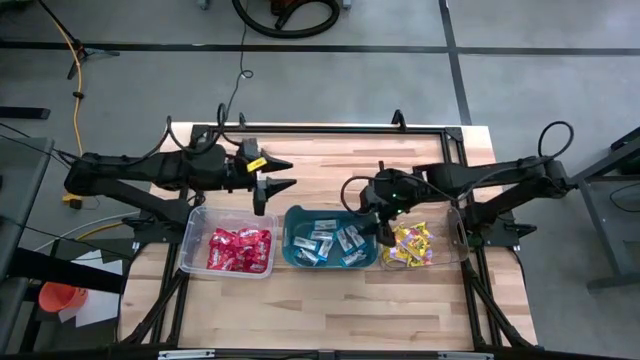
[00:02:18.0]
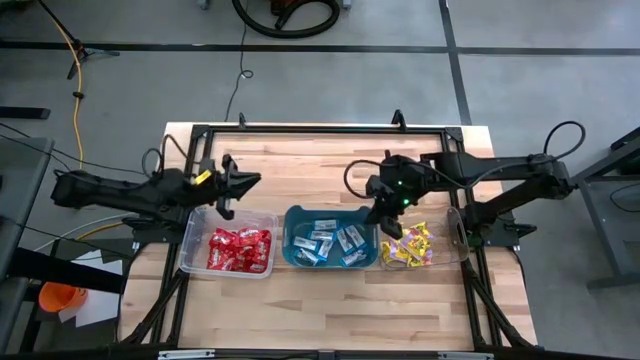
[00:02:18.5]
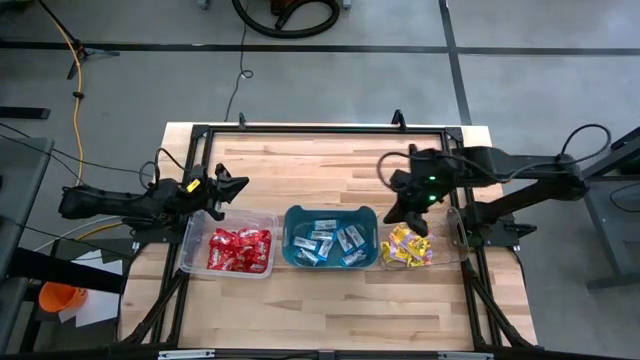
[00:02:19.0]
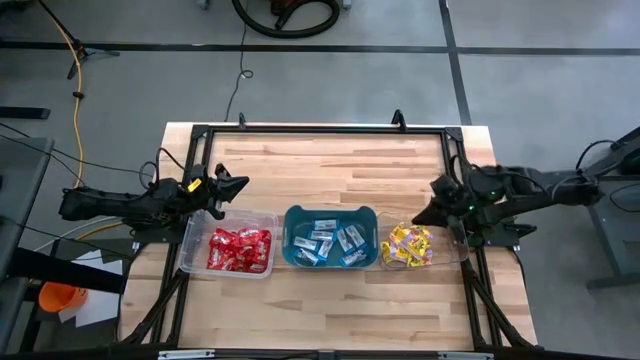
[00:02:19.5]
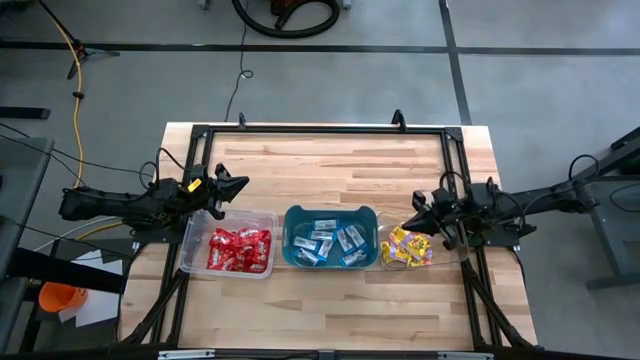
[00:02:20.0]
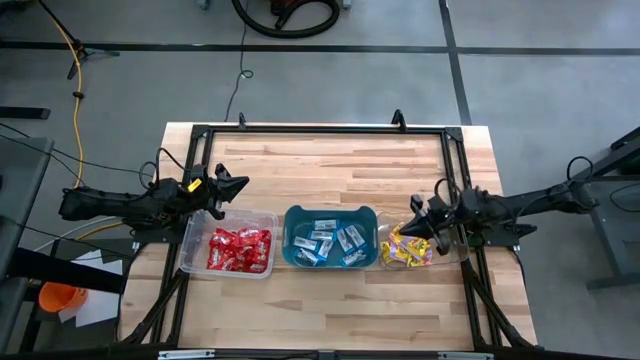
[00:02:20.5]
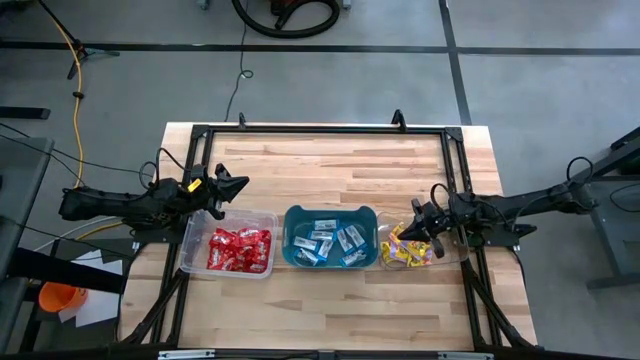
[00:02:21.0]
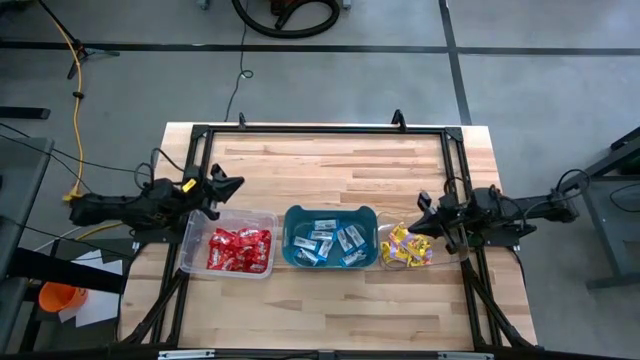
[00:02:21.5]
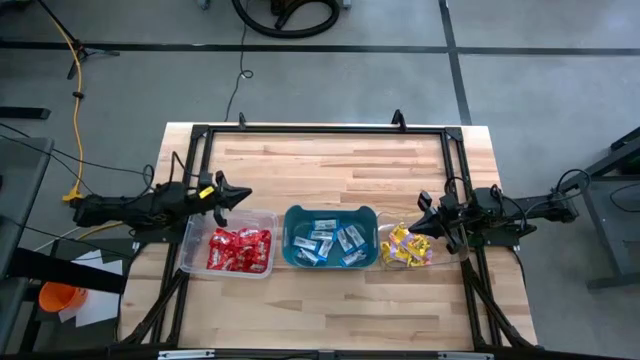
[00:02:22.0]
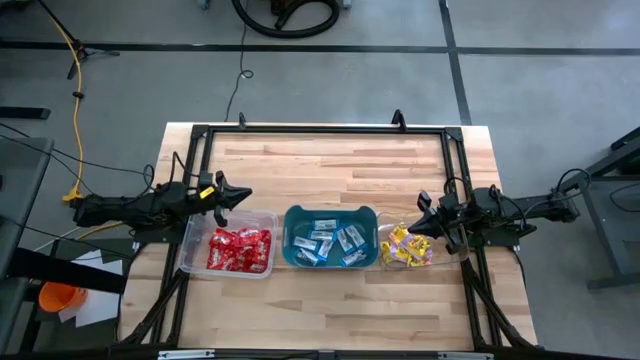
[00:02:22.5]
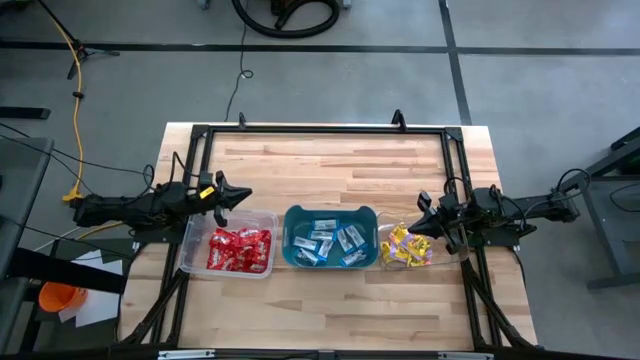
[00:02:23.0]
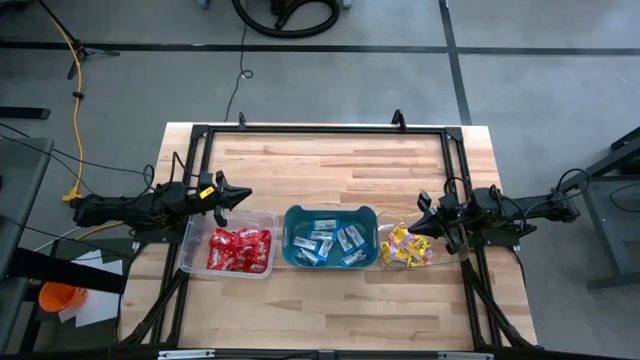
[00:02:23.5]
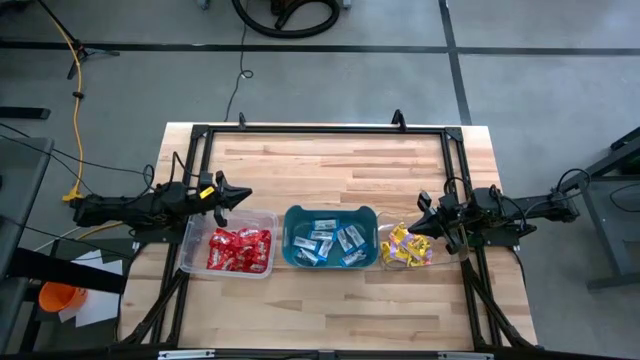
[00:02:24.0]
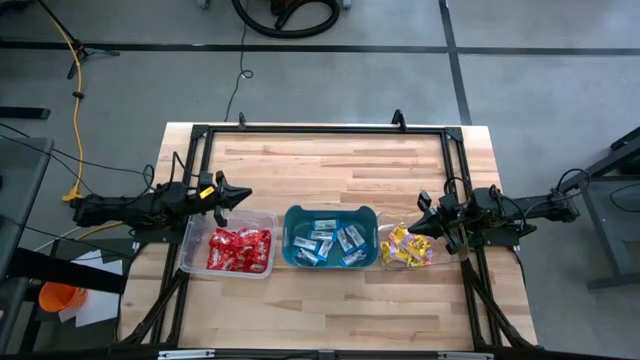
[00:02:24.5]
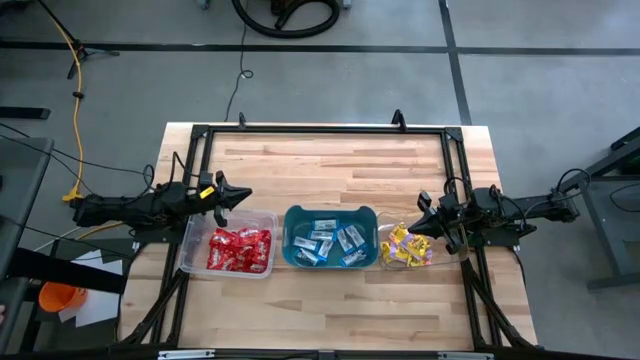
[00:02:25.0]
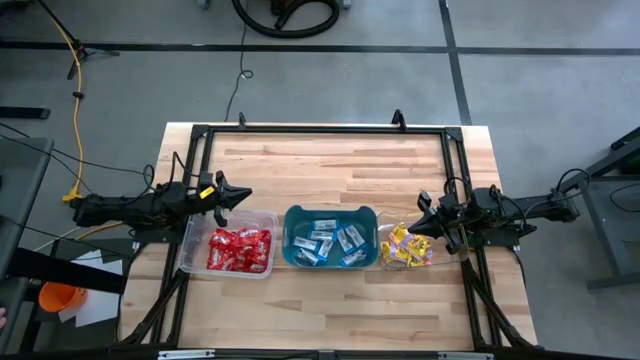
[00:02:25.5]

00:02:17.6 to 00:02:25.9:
Task: Sort candy
Return to Home Position

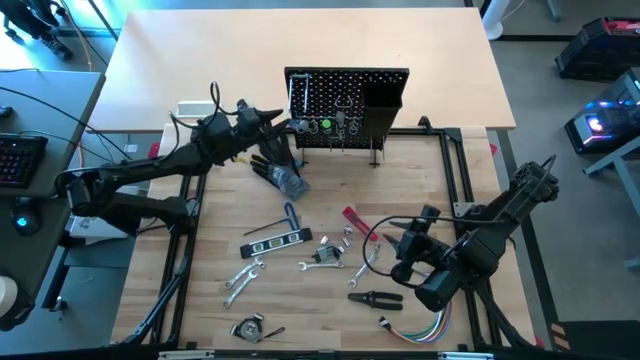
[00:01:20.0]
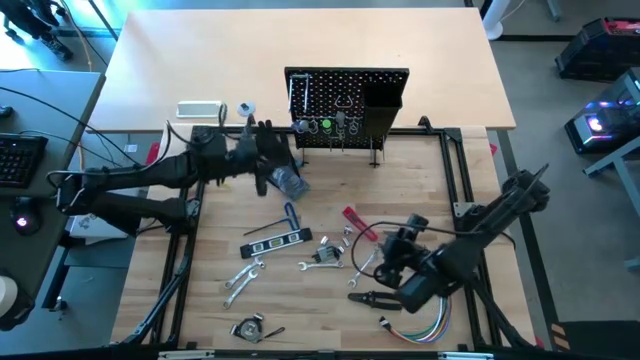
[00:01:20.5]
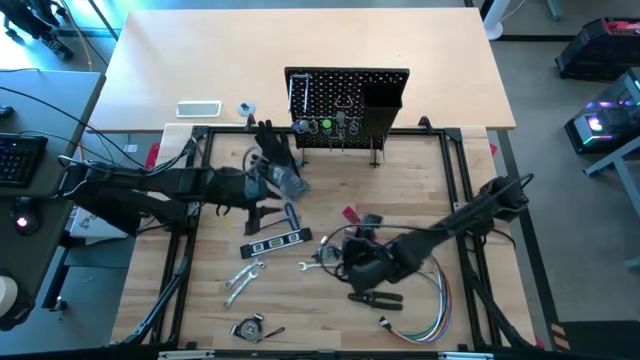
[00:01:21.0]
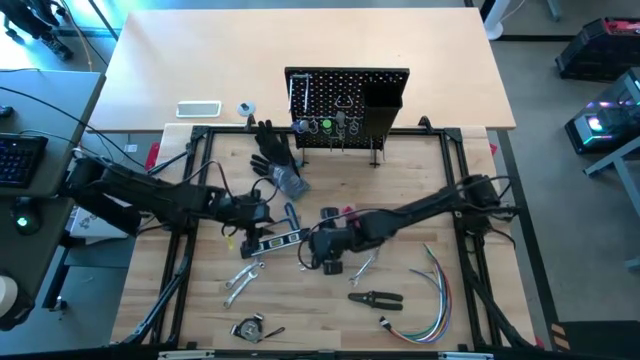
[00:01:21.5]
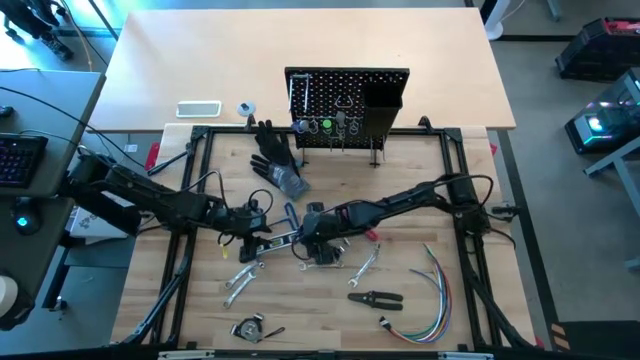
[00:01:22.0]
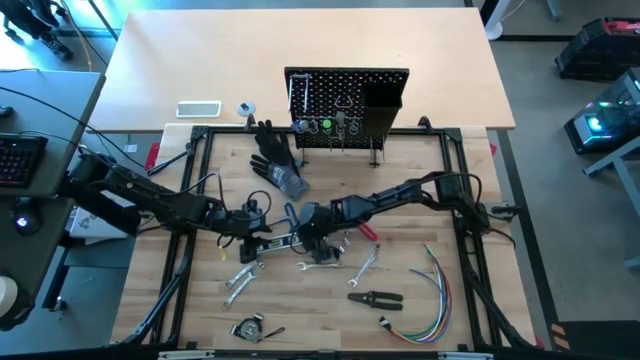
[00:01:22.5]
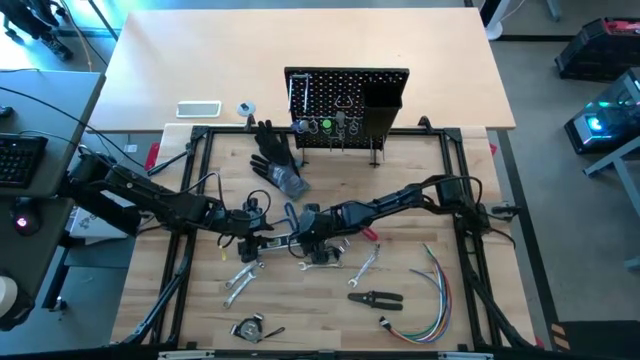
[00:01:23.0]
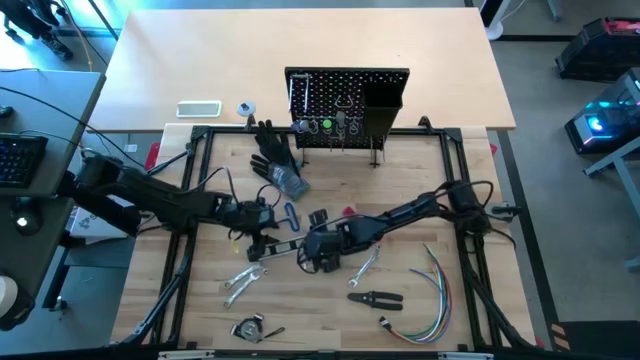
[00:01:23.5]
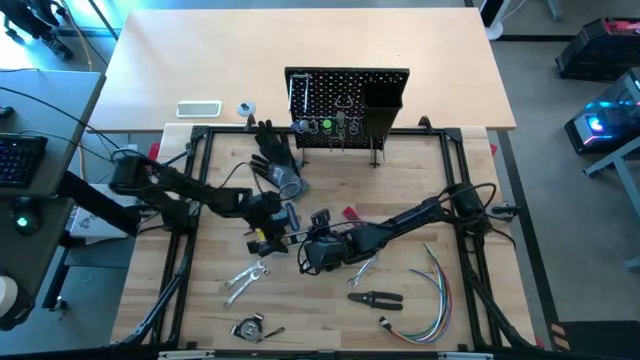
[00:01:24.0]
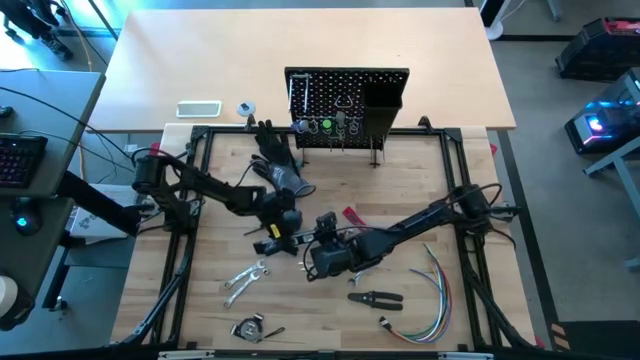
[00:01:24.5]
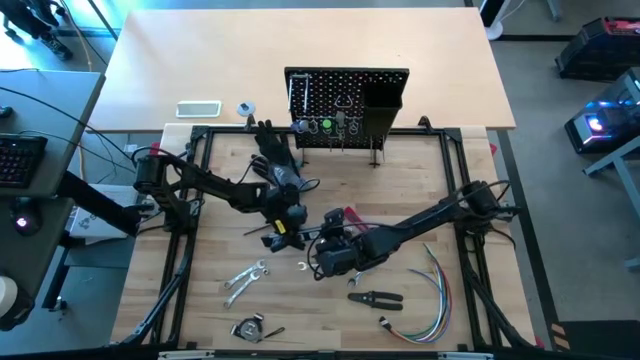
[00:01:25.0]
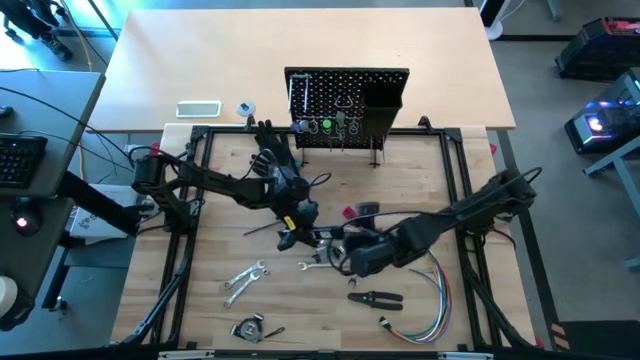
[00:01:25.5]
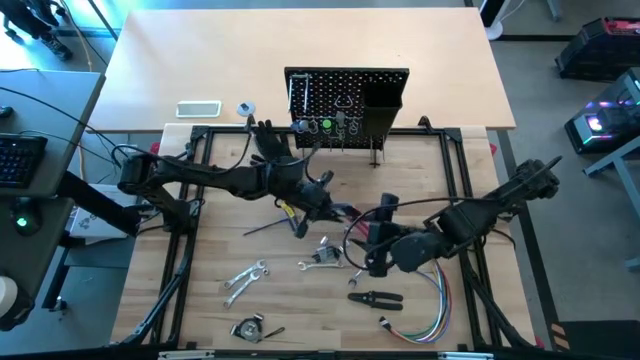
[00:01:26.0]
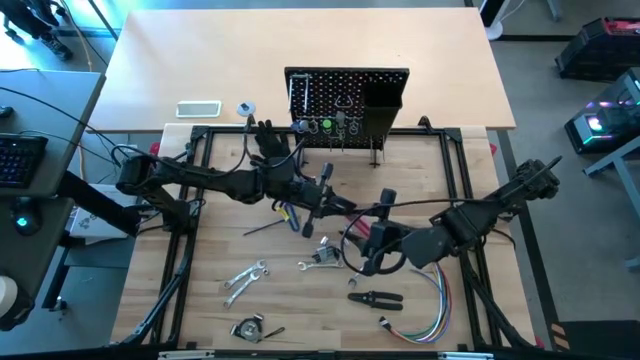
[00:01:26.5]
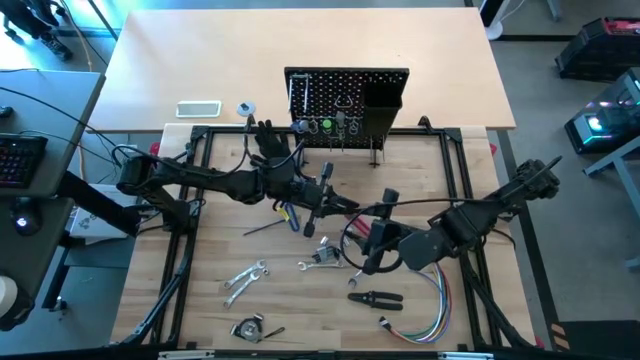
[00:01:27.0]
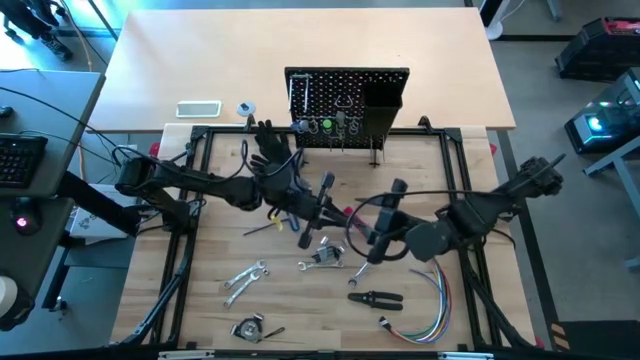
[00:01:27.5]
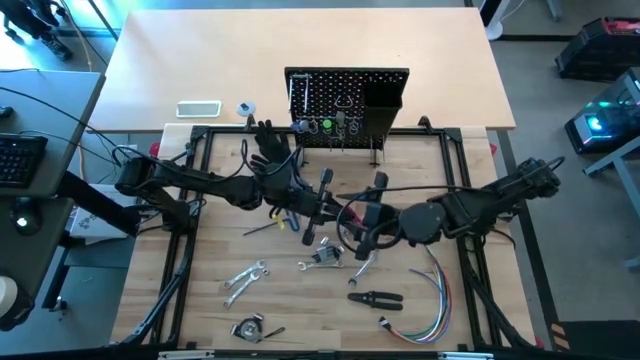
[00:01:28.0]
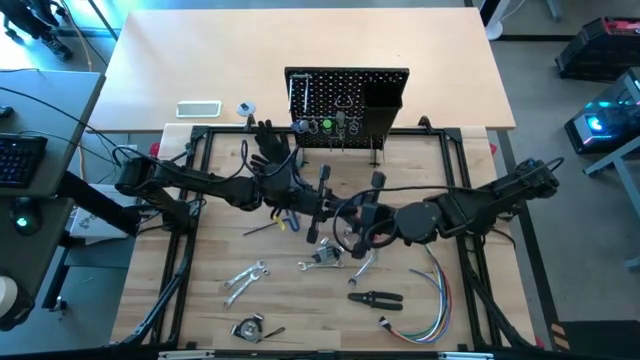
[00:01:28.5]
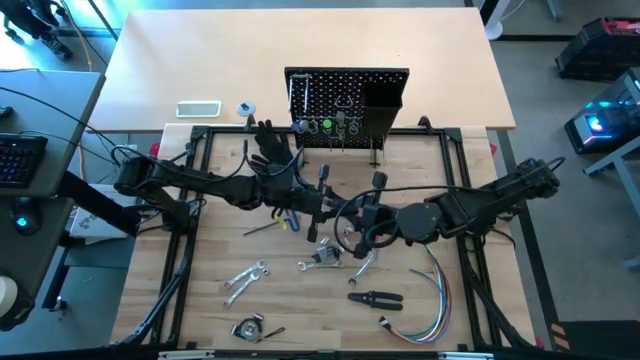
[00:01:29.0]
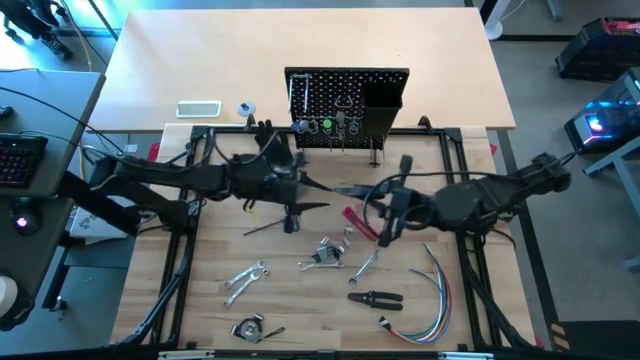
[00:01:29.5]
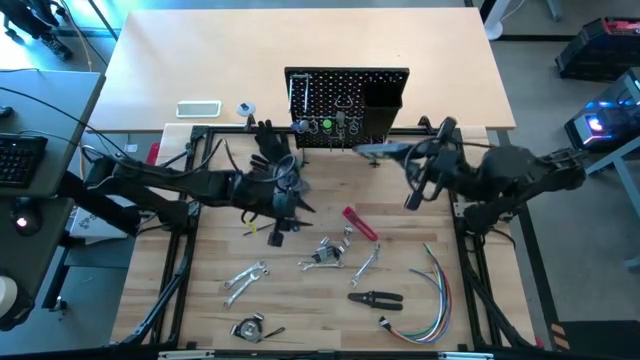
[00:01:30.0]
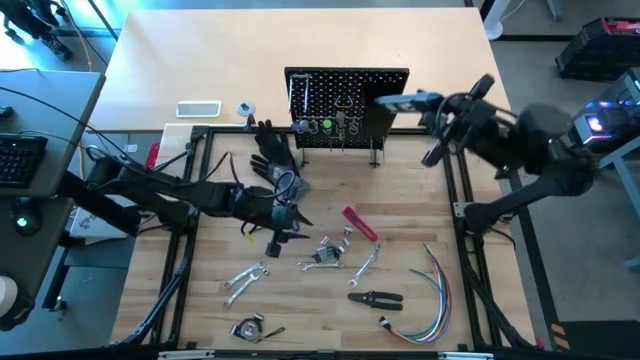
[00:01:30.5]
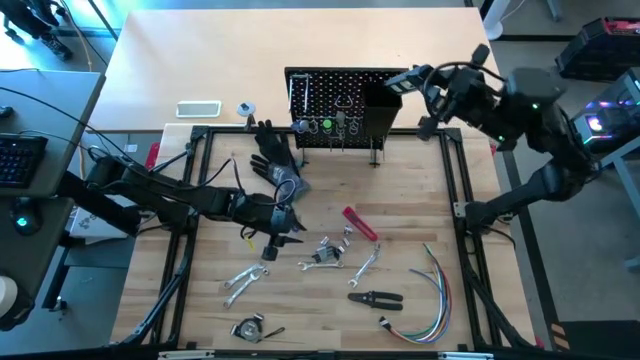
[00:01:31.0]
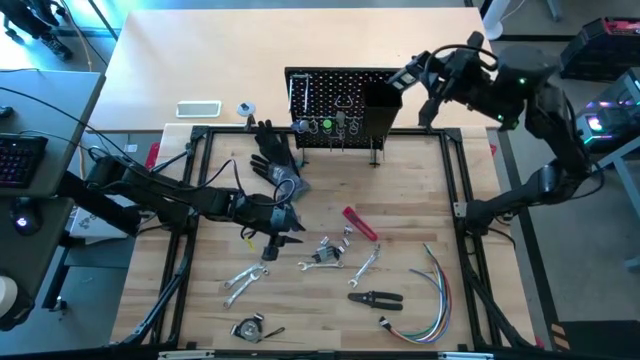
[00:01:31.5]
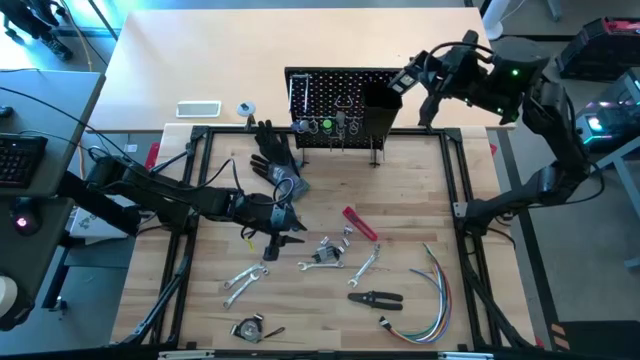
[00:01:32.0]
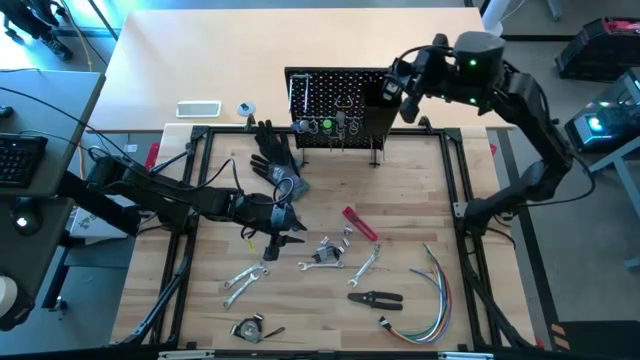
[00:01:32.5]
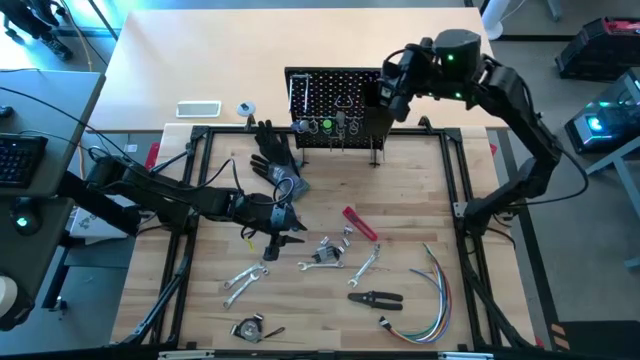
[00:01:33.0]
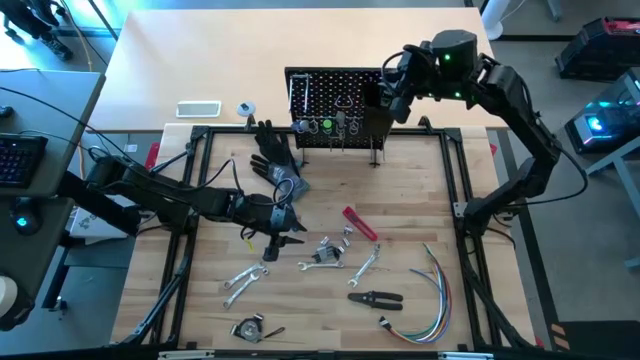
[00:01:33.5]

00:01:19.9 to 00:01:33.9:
Task: Hang tools onto peg board
Put the black spirit level into the black bin on the pegboard
